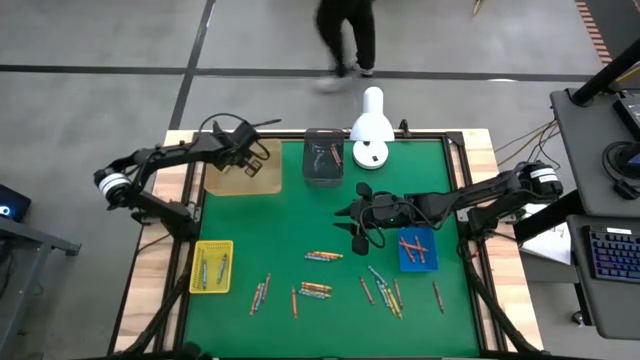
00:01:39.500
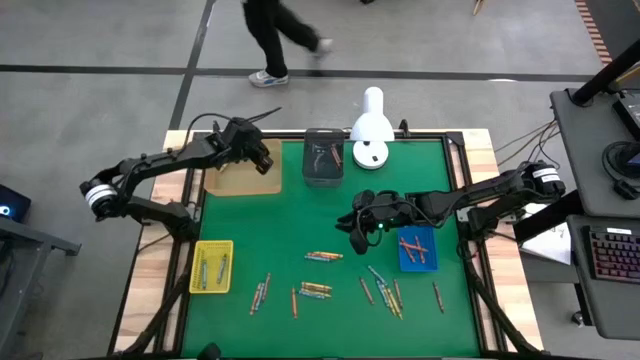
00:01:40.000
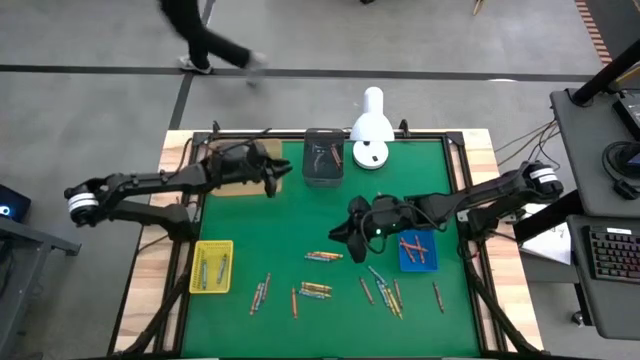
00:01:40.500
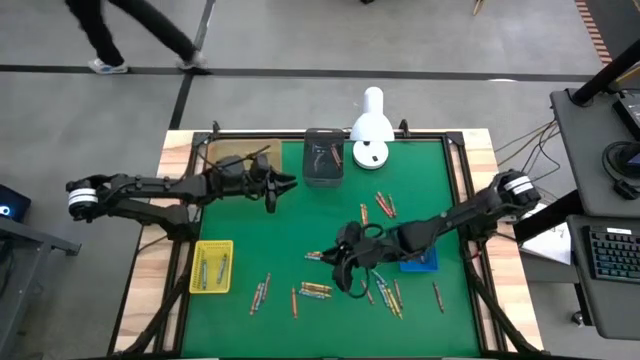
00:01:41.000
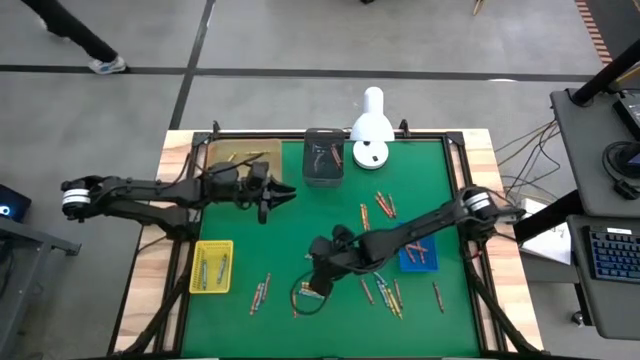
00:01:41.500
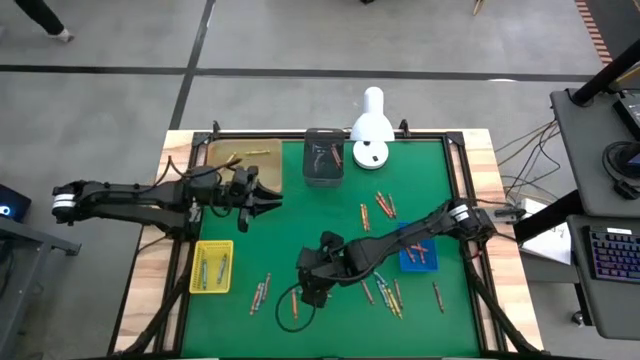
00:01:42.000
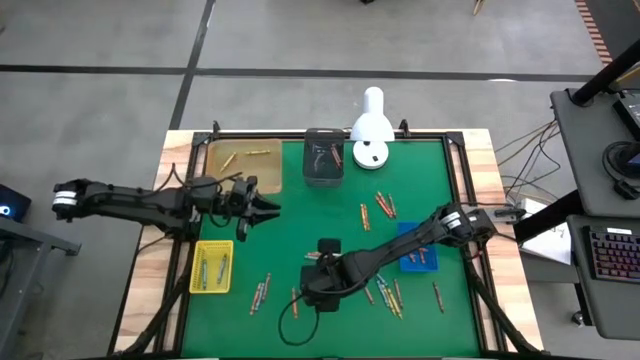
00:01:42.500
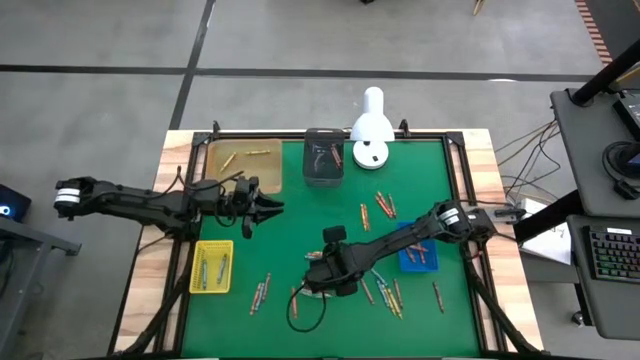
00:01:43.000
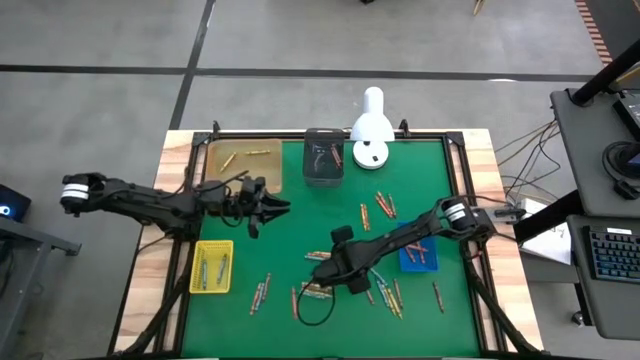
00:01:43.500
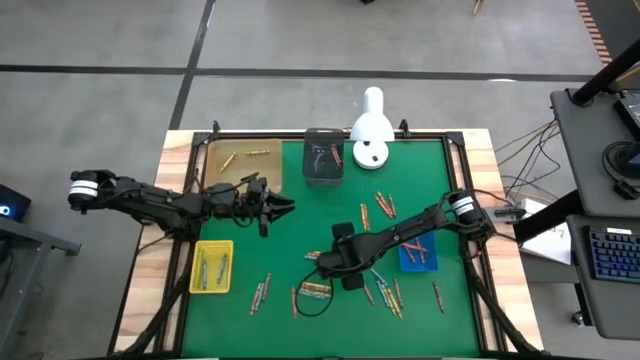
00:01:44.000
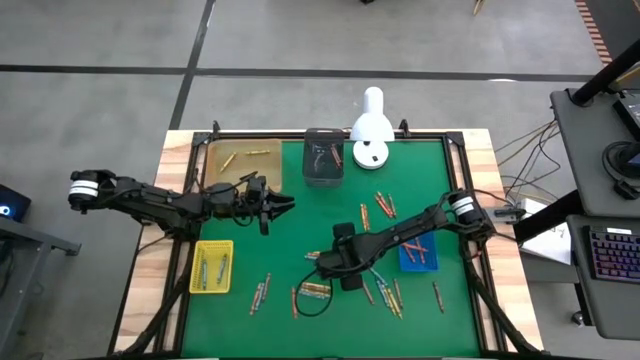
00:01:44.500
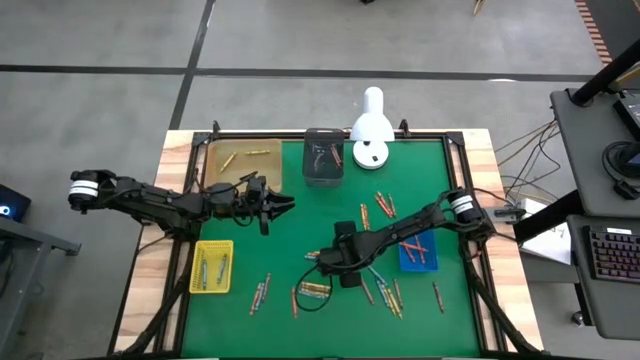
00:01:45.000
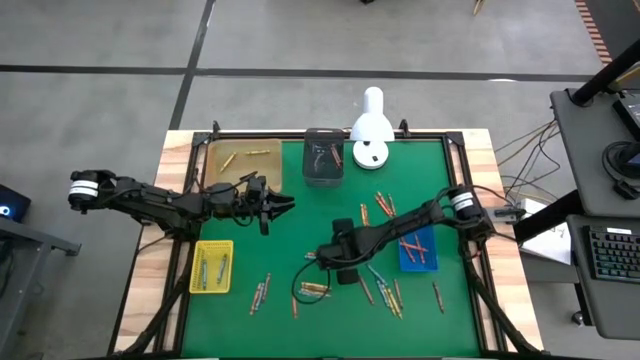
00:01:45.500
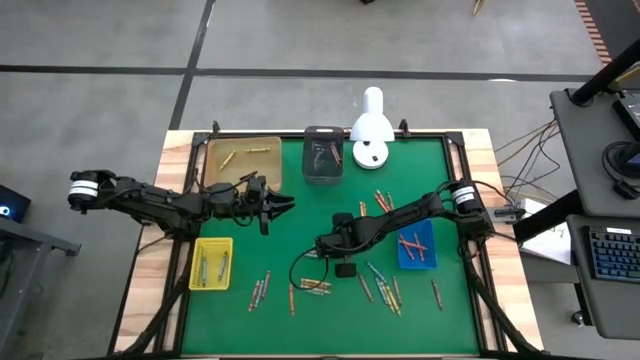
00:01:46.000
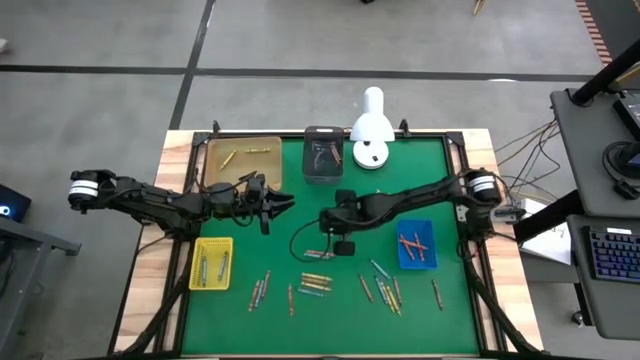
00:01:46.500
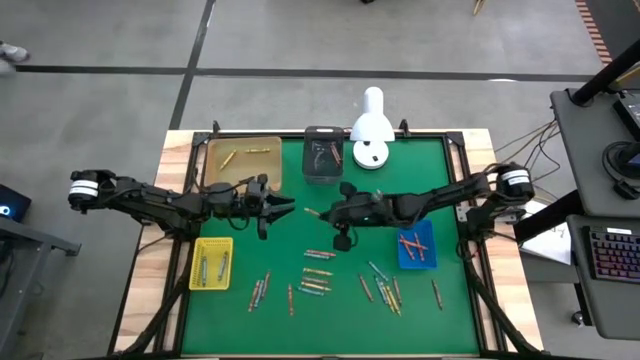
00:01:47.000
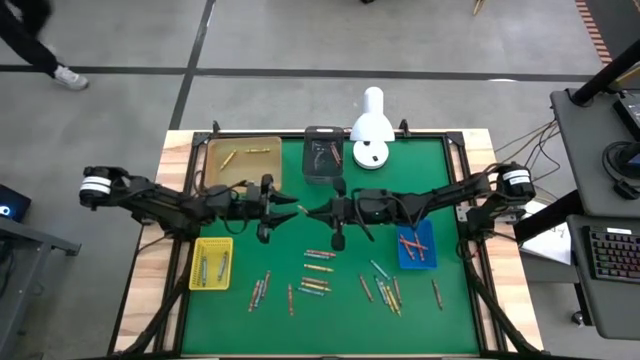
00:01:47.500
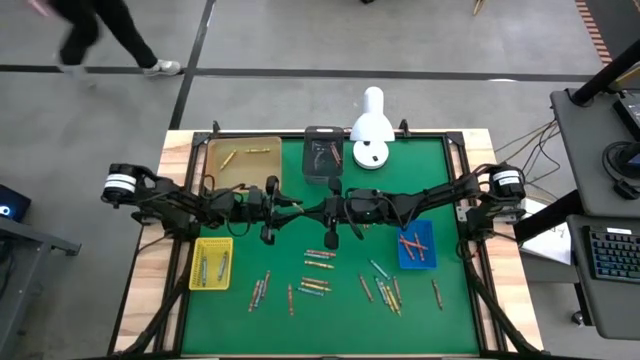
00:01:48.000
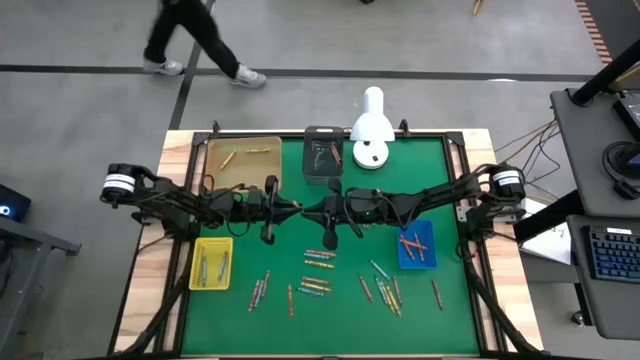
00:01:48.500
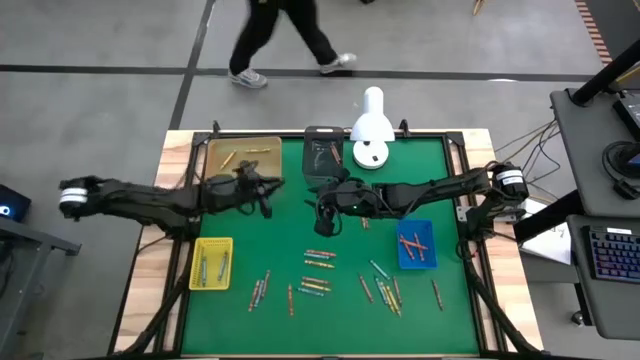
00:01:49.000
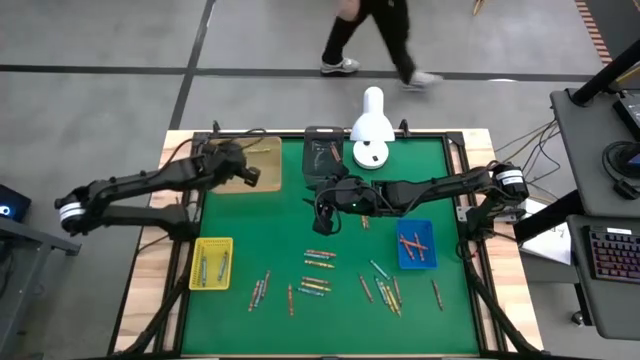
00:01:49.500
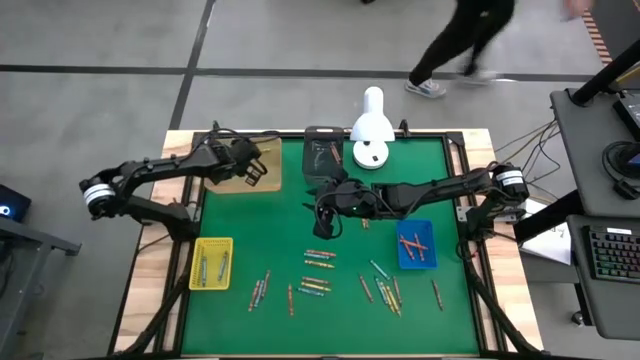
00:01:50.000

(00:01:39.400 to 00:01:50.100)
Task: Sort crayons
Put the green crayon into the orange bin

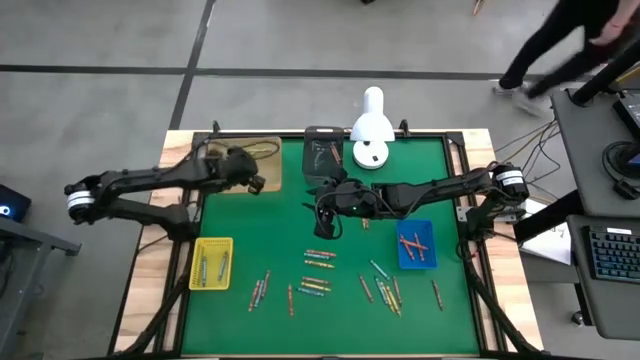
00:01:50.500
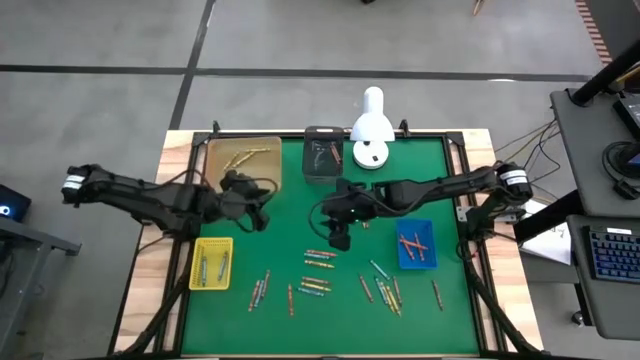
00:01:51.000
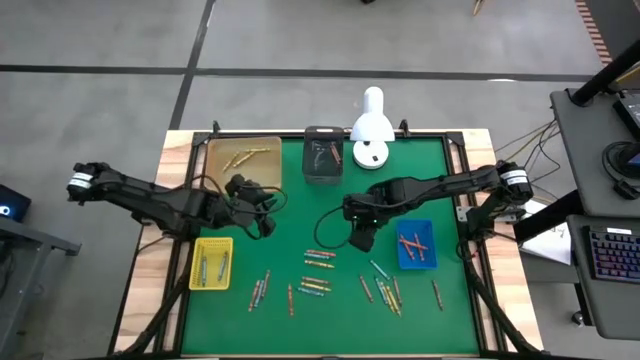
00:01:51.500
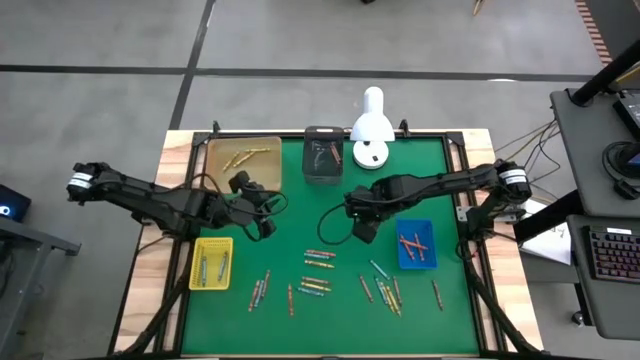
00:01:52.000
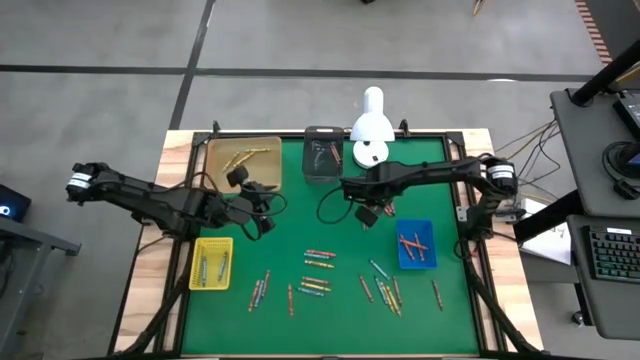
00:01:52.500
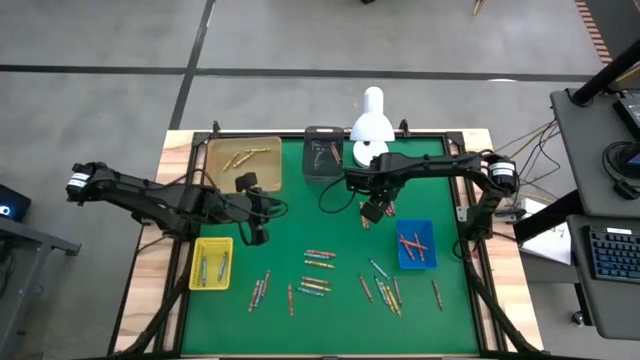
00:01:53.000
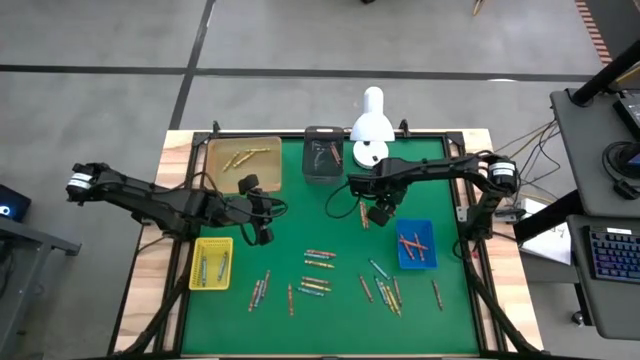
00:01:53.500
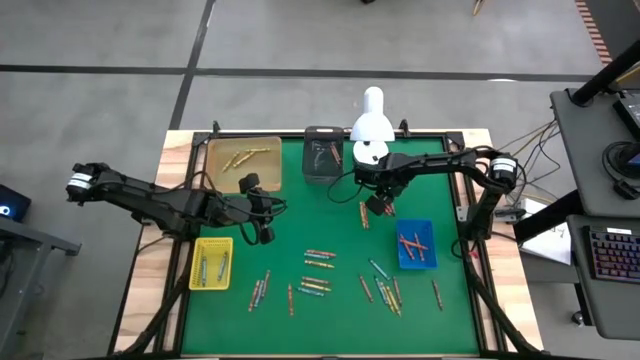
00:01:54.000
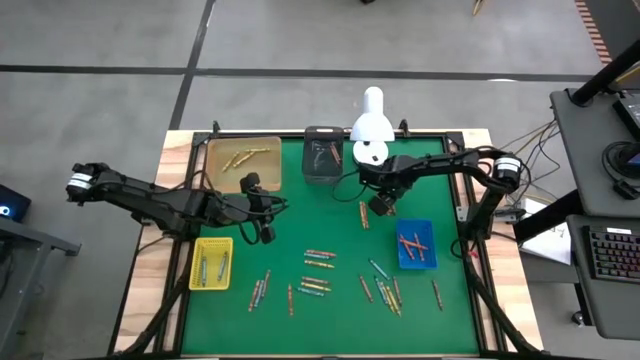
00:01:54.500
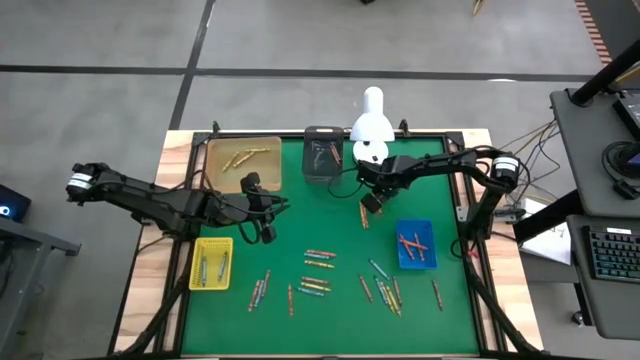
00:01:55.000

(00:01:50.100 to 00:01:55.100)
Put the brown crayon into the black bin

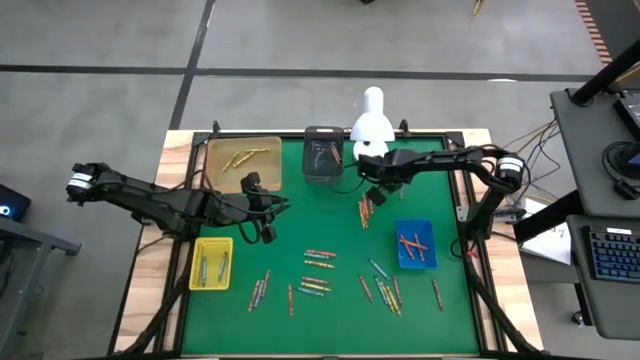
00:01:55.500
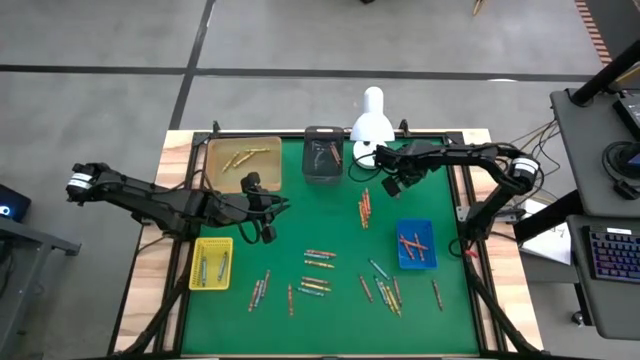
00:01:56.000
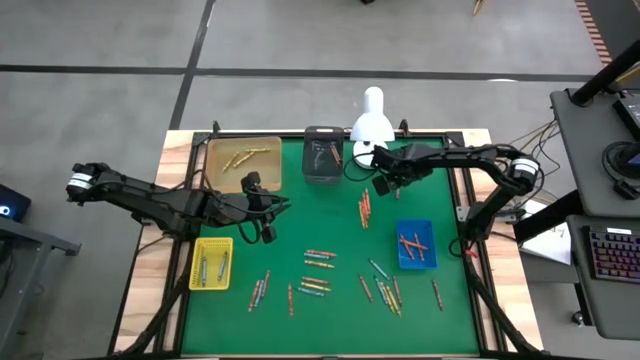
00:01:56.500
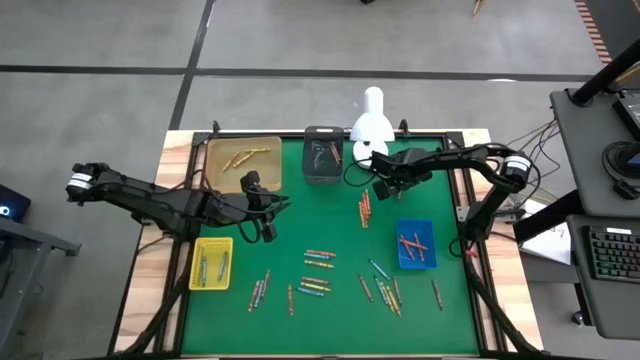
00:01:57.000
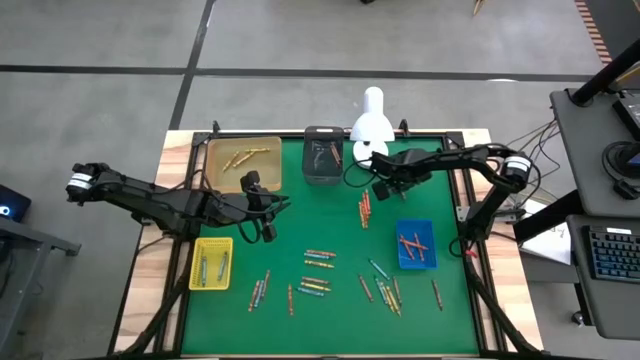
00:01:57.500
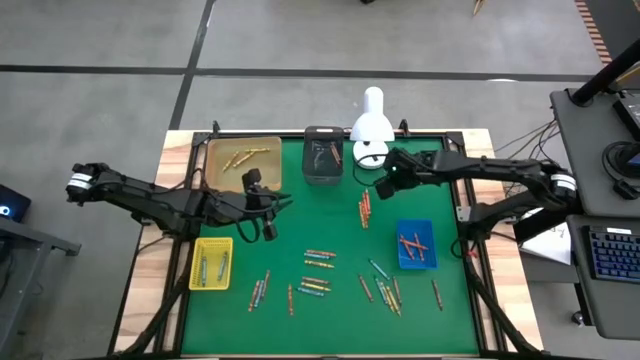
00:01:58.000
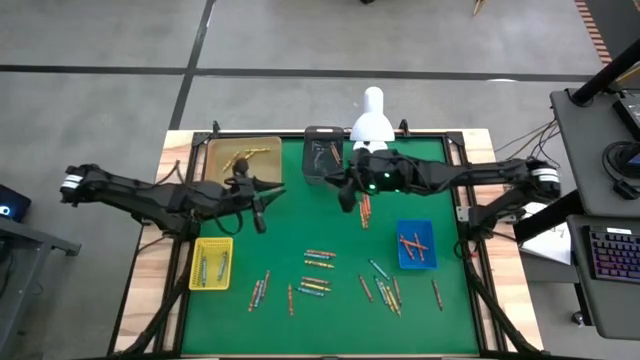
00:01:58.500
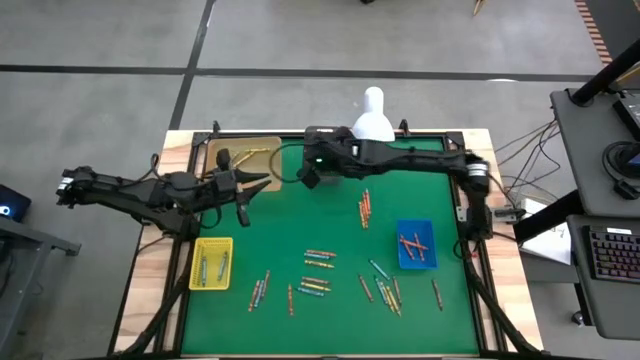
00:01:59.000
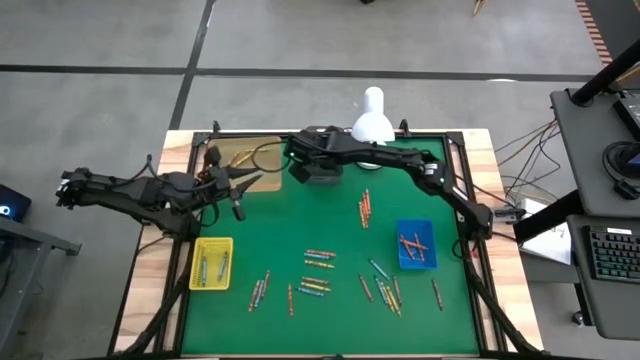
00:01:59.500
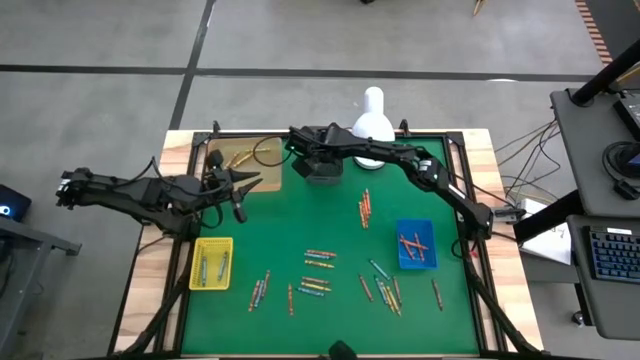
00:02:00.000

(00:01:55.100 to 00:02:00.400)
Put the brown crayon into the black bin

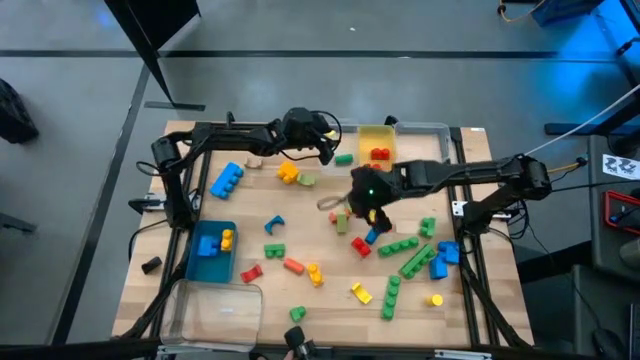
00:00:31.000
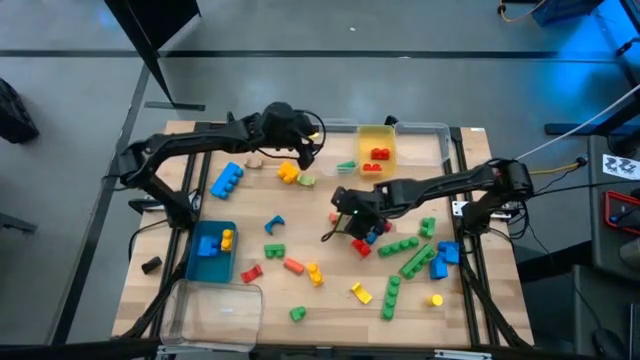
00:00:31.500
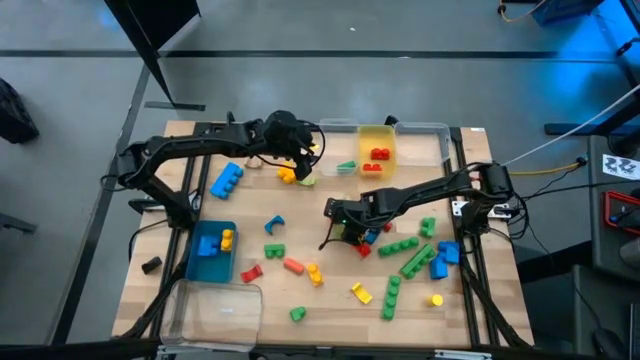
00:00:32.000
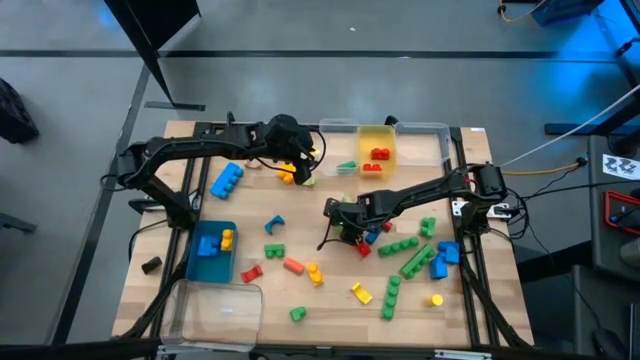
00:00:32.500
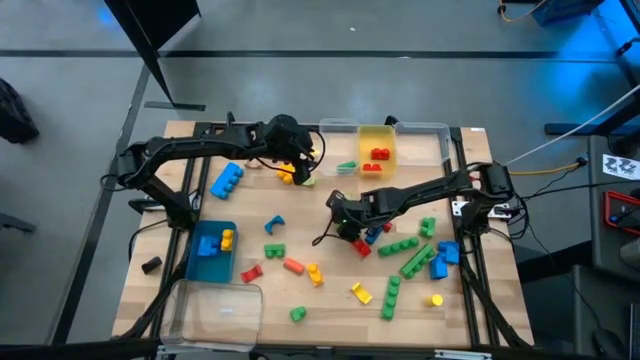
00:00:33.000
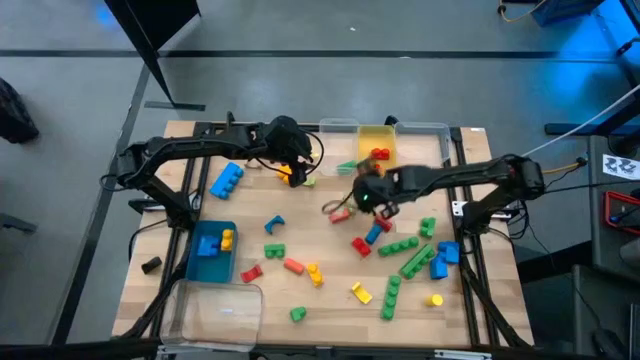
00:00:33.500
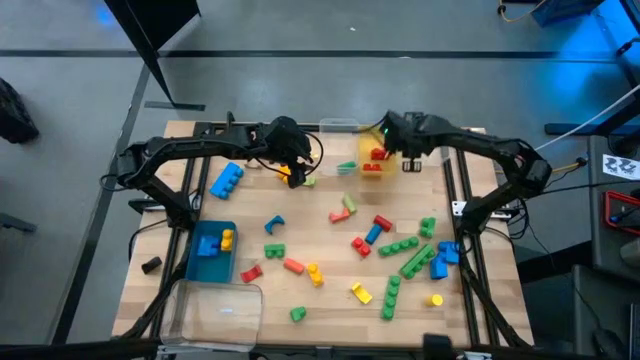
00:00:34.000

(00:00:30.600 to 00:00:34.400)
Task: Sort blocks by size
Put the light green arch block into the top right transparent bin
